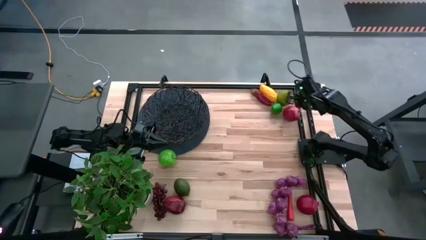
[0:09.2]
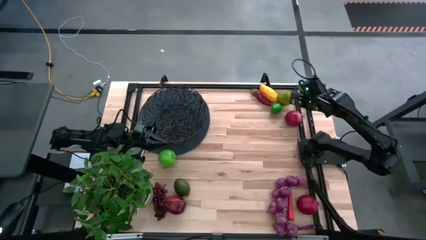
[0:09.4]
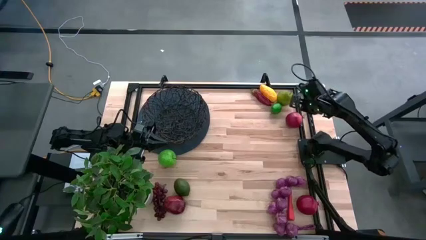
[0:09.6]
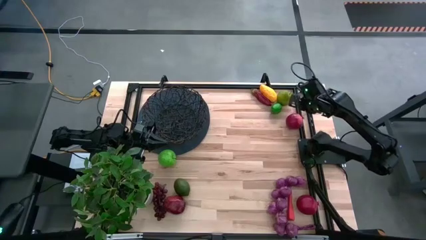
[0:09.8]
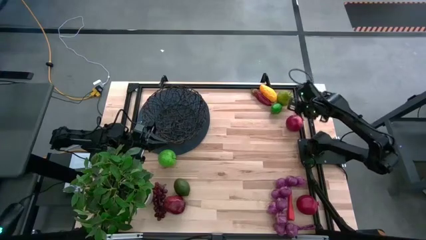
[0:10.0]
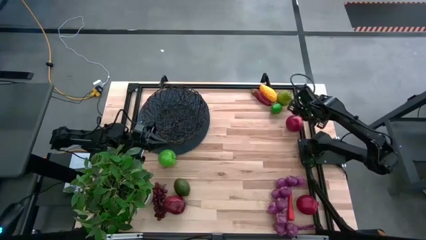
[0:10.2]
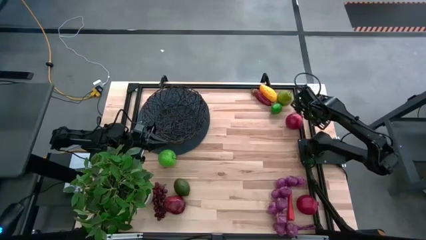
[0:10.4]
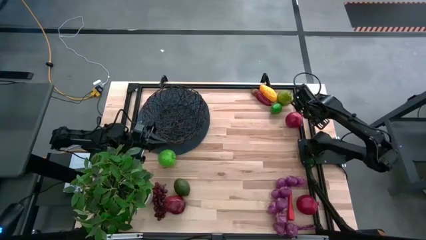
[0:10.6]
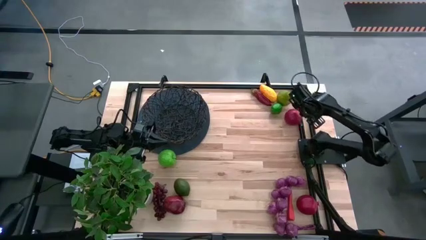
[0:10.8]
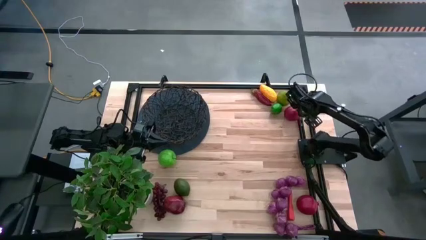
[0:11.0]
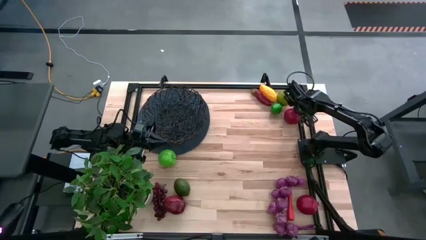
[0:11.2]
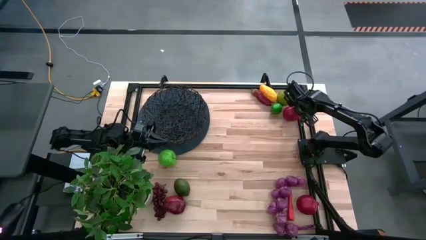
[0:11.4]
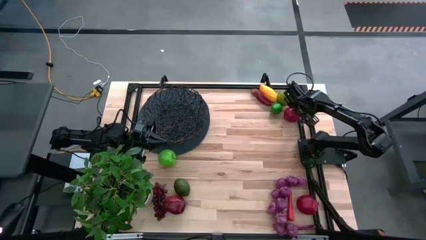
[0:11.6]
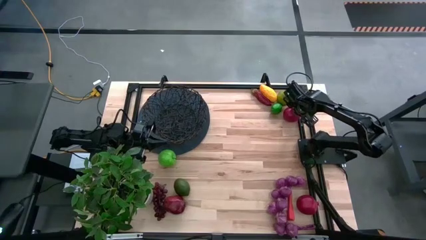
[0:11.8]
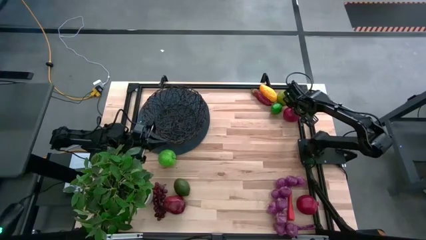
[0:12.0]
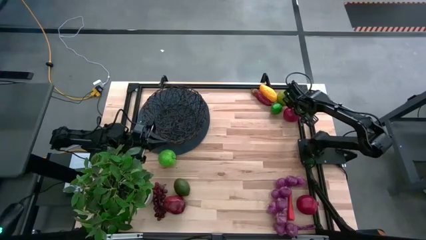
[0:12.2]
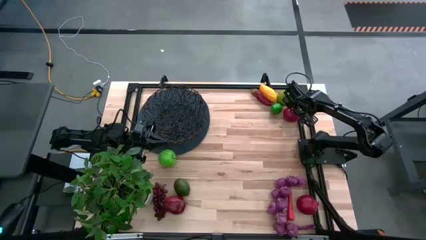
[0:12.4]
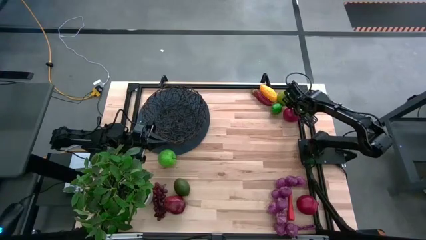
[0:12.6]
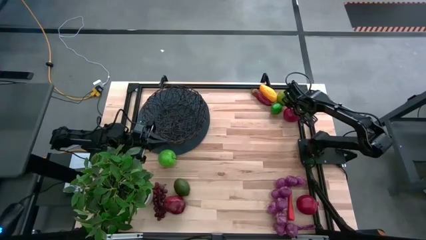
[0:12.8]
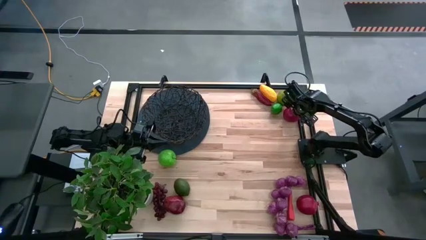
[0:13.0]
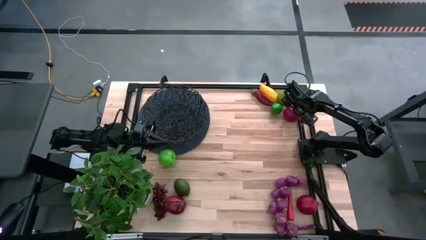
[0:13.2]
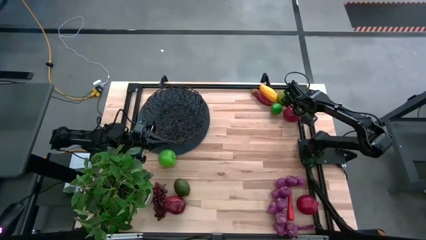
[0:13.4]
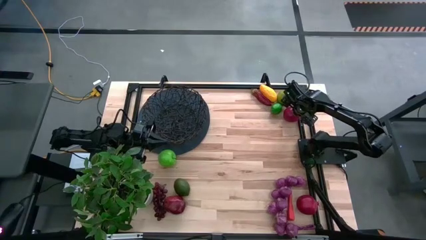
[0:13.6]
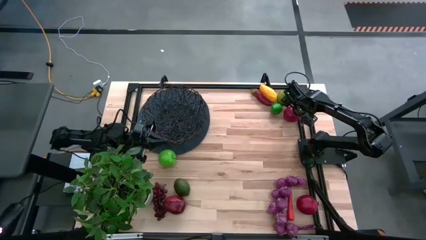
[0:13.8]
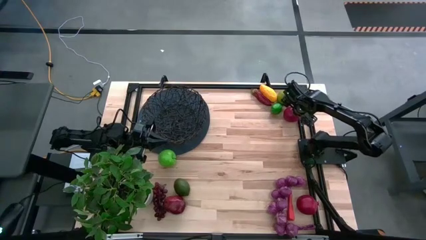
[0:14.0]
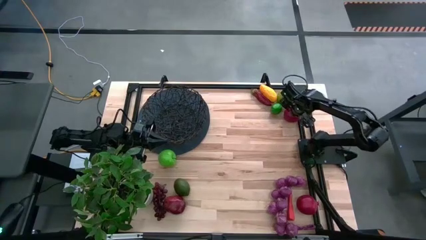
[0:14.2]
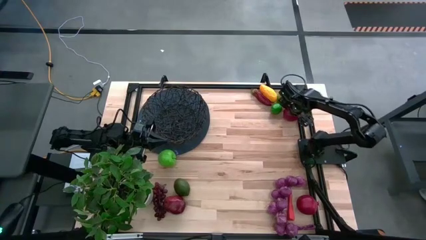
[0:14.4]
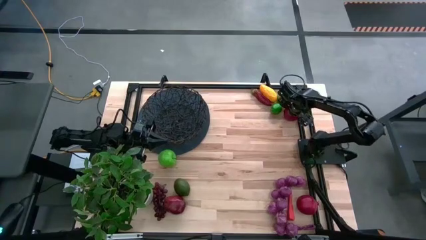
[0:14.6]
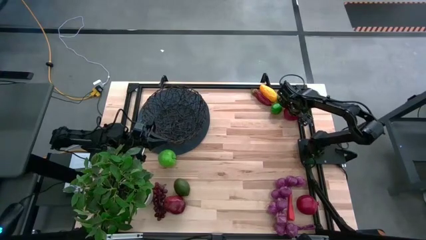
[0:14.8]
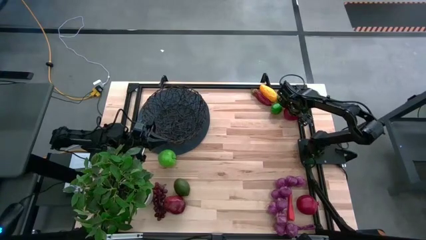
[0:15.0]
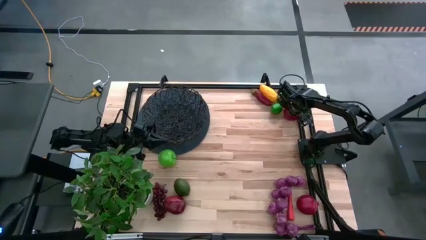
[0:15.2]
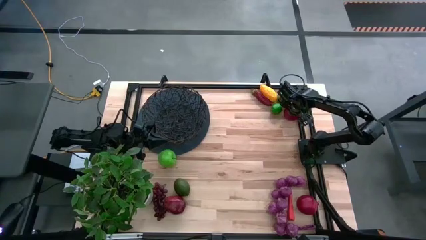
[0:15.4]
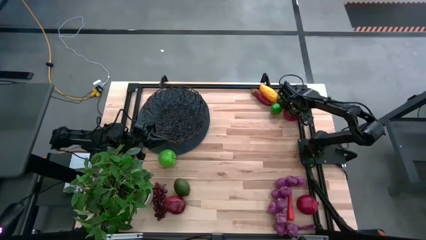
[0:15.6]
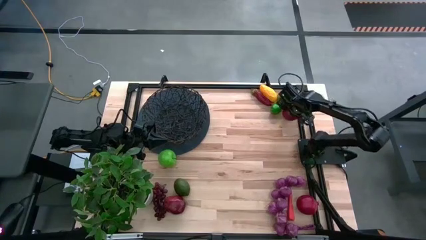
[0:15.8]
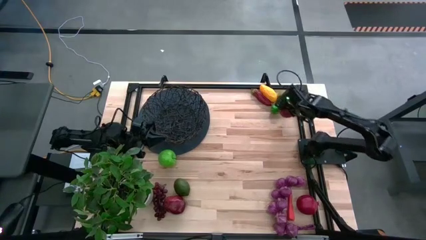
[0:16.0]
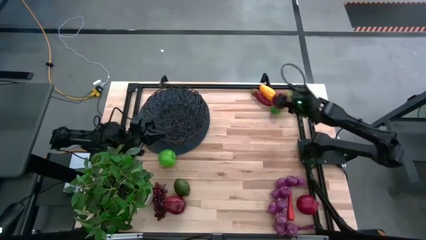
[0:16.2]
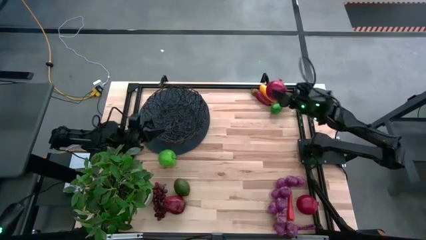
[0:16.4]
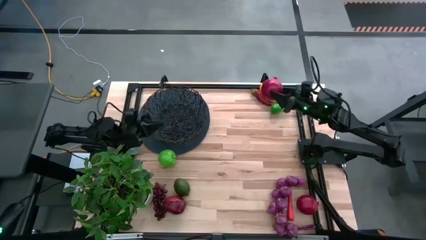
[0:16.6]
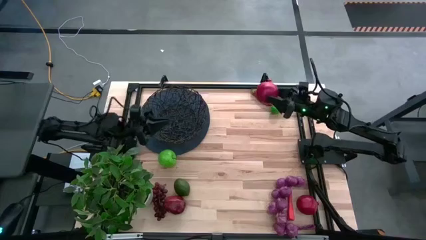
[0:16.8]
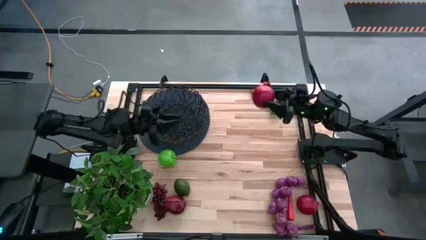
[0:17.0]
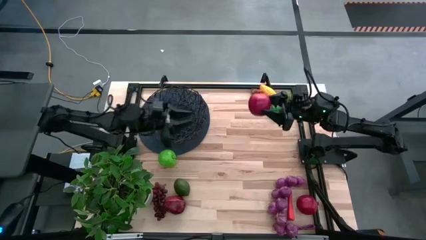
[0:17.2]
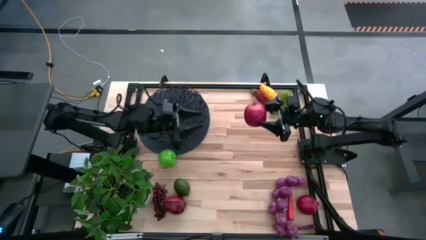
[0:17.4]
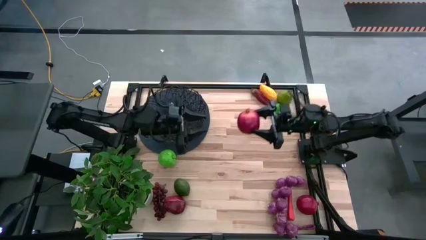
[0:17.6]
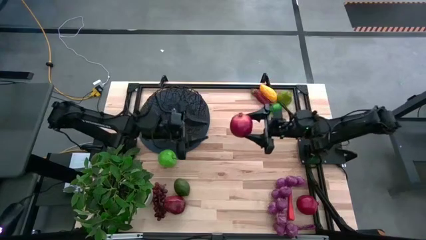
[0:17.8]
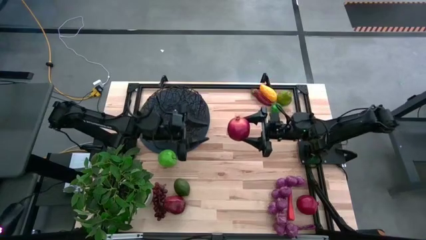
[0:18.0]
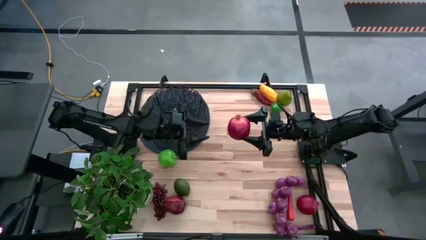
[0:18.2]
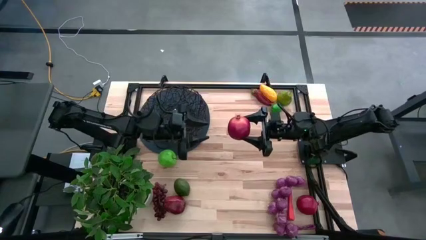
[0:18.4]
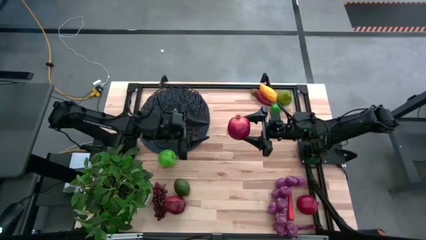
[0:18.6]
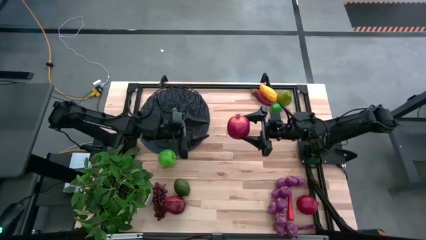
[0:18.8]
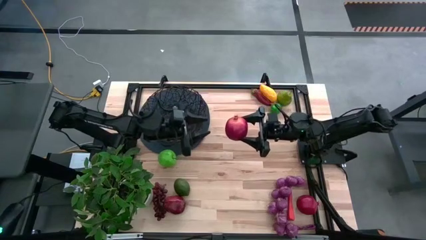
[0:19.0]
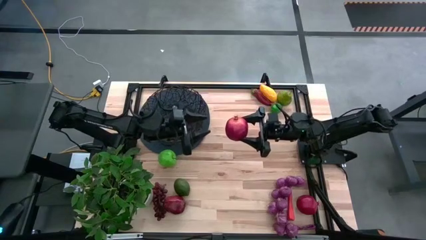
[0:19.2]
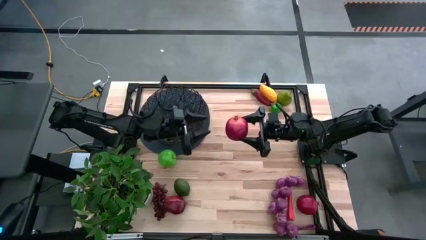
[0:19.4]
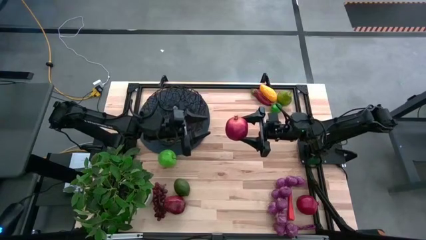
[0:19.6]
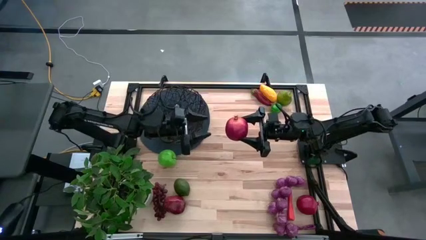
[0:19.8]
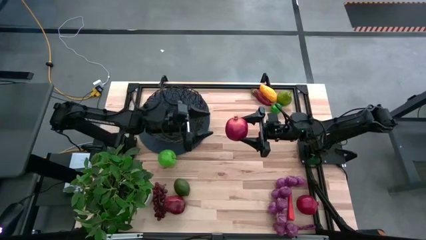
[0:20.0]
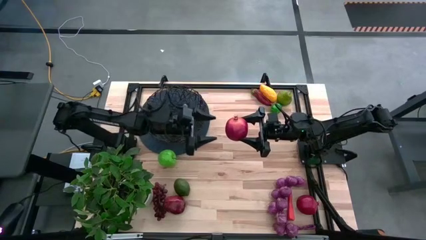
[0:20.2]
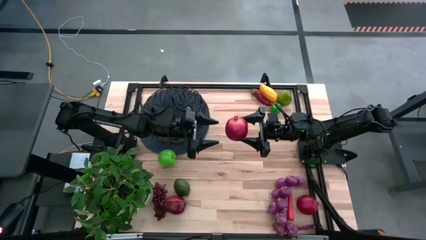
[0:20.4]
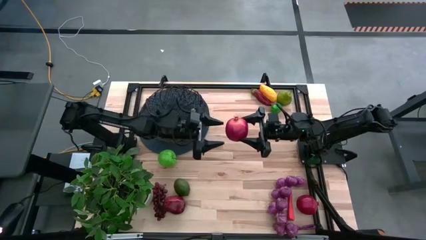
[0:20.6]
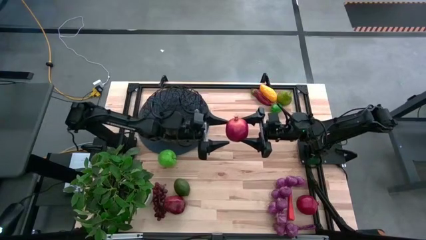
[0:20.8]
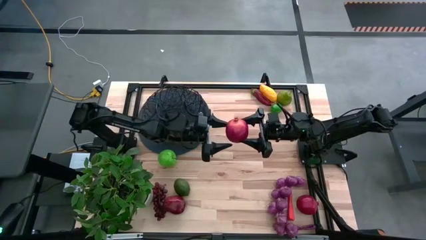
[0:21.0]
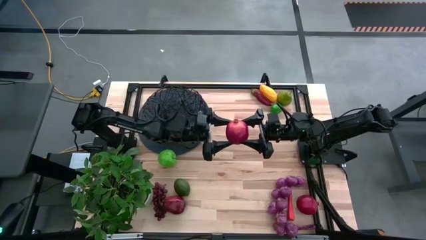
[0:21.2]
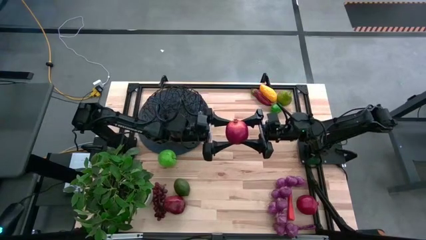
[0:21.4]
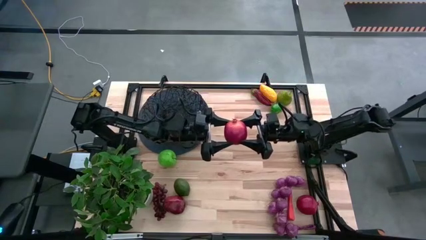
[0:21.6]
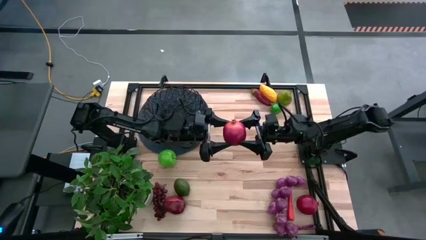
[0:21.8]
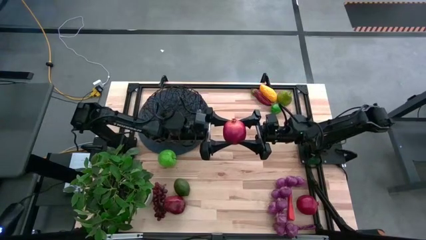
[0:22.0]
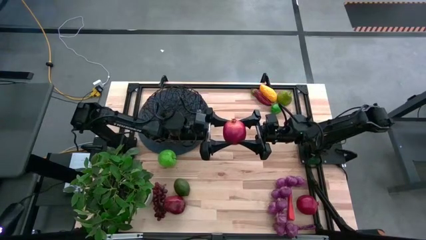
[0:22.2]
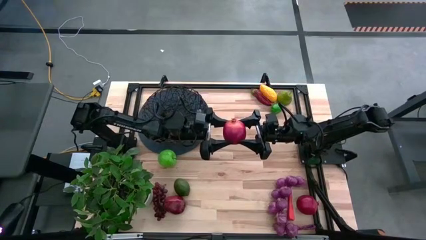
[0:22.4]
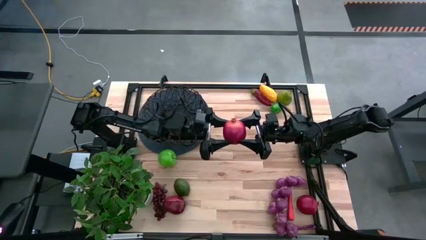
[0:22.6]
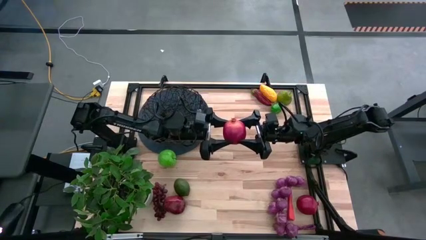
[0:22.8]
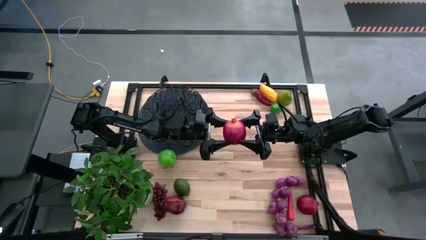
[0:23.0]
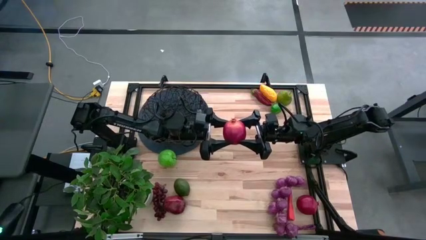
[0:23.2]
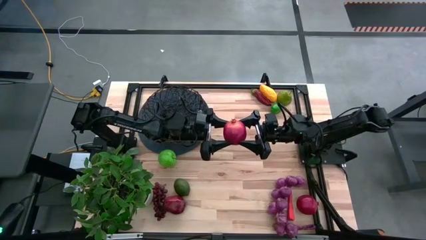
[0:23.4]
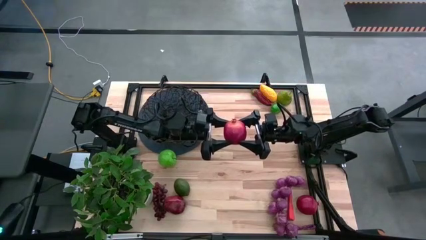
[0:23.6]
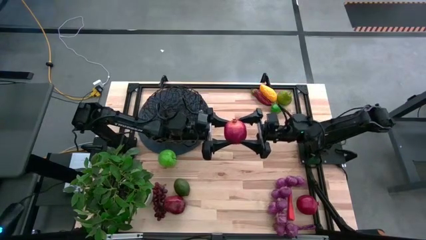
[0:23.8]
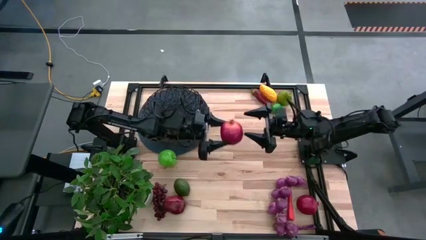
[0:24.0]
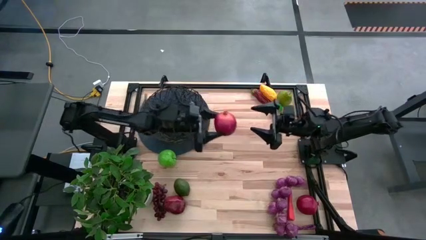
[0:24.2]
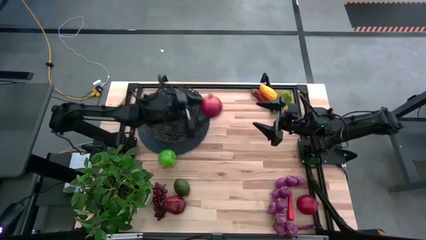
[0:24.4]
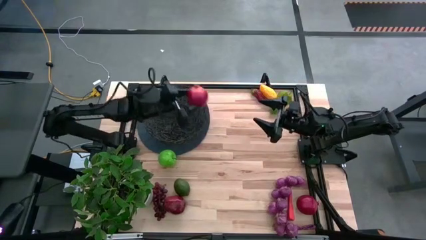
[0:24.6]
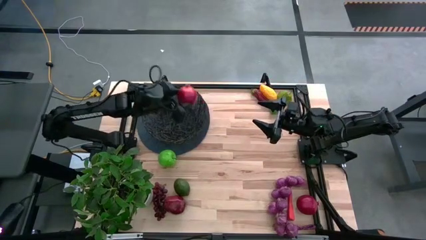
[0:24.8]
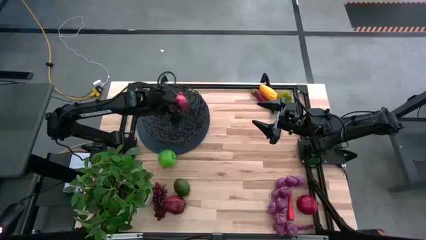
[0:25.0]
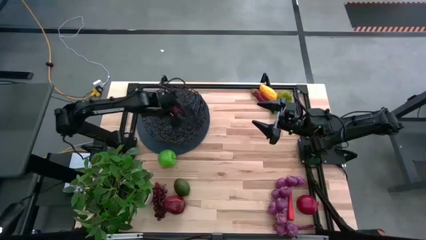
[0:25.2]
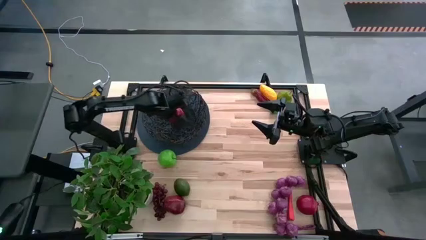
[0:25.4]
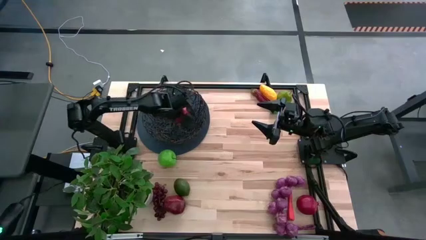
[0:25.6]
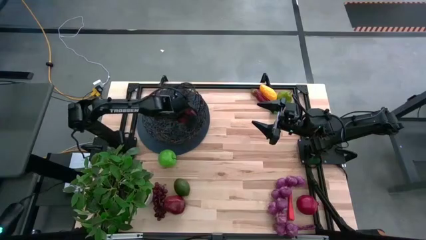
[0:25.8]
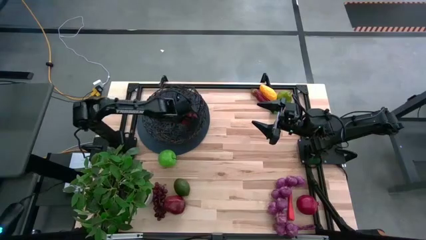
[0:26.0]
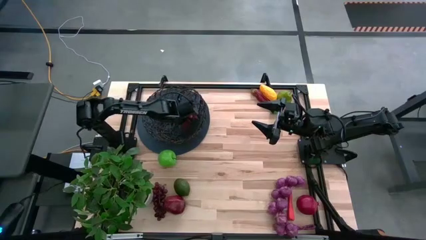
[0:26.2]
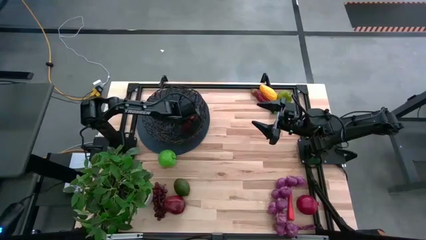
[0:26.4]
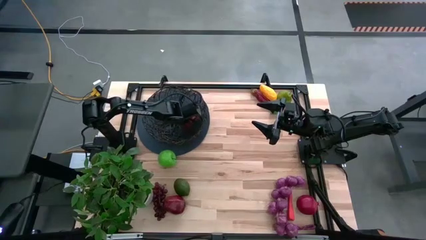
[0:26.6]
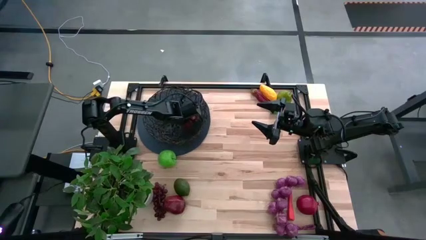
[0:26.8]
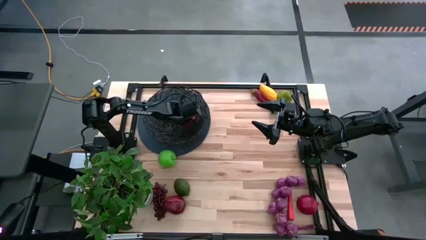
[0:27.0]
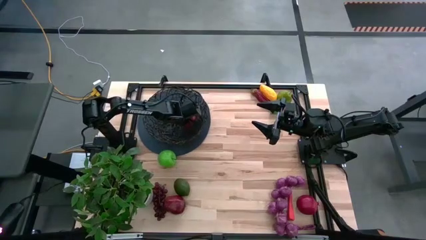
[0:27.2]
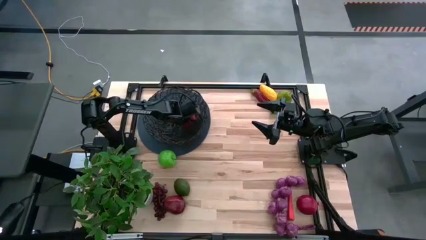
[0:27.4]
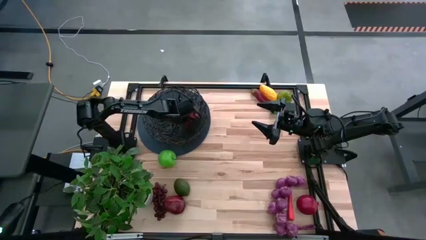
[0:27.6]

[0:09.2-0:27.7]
Task: Build produce basket
Put the top pomegranate into the wire basket
